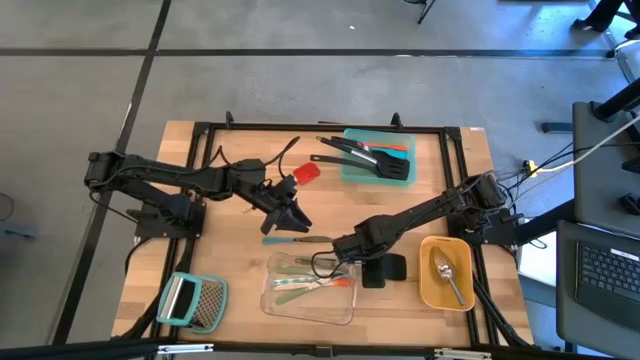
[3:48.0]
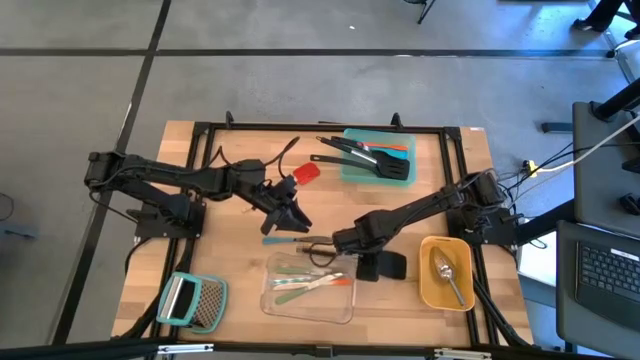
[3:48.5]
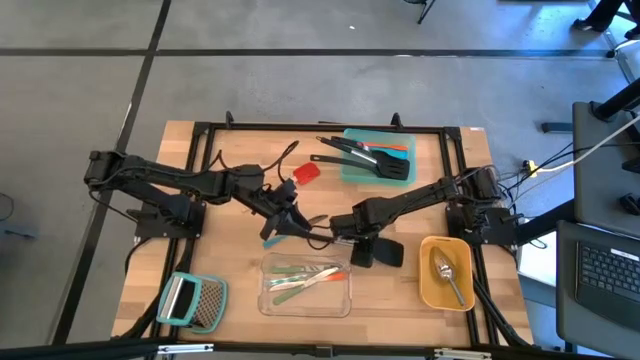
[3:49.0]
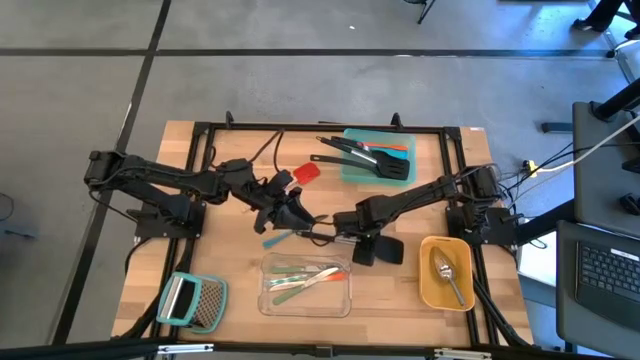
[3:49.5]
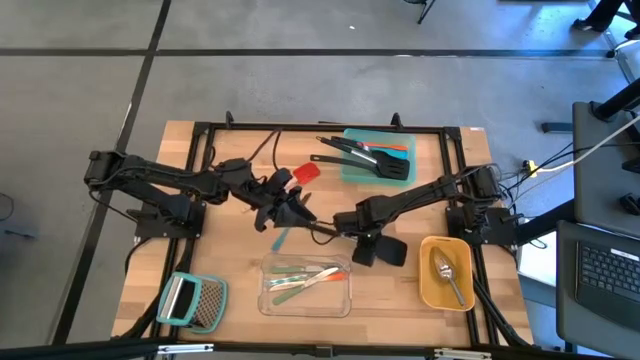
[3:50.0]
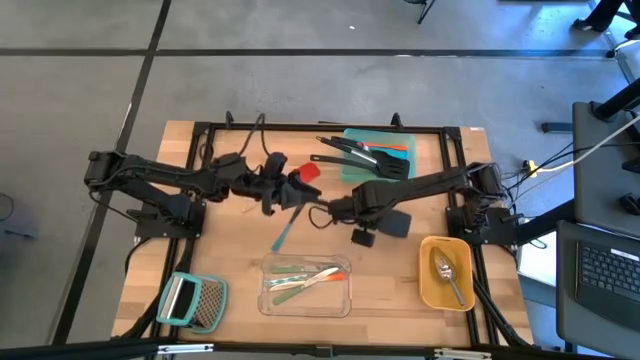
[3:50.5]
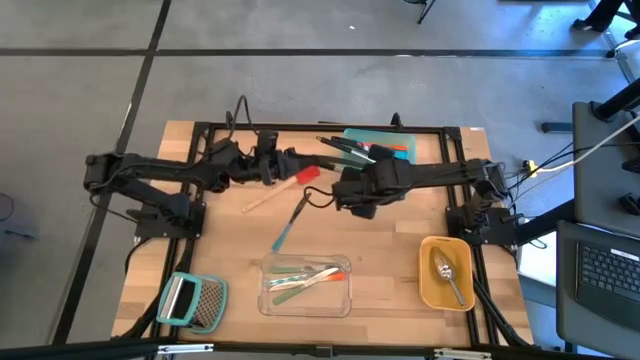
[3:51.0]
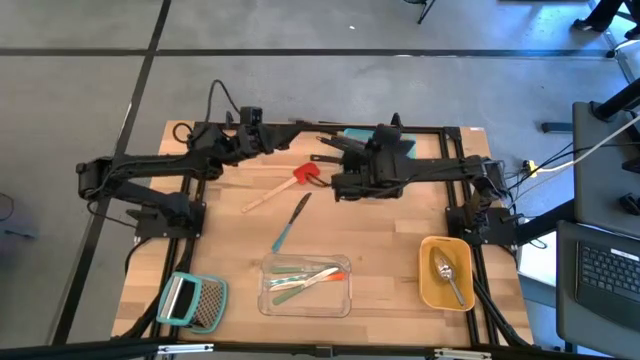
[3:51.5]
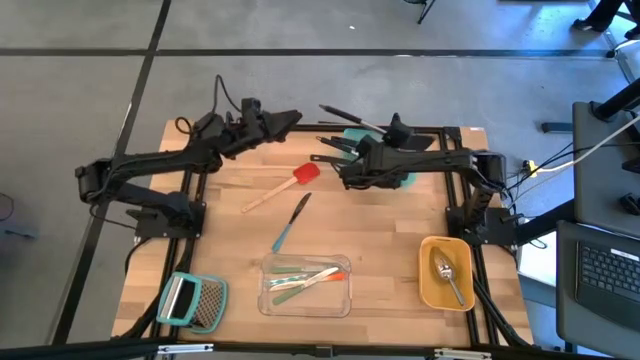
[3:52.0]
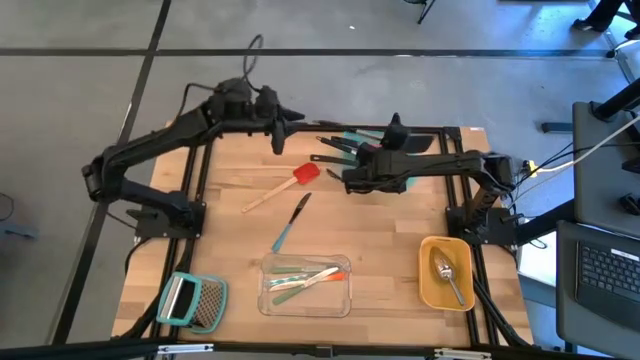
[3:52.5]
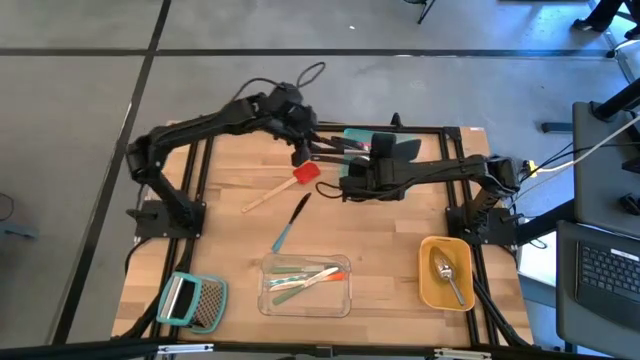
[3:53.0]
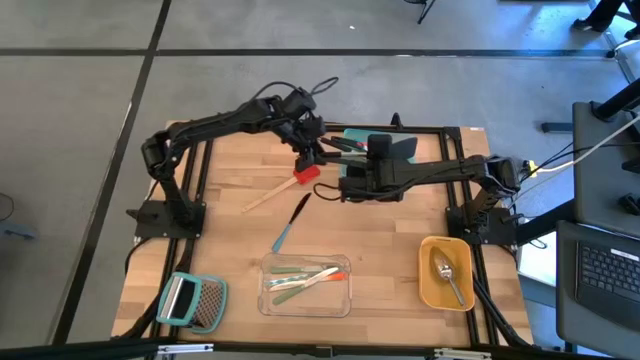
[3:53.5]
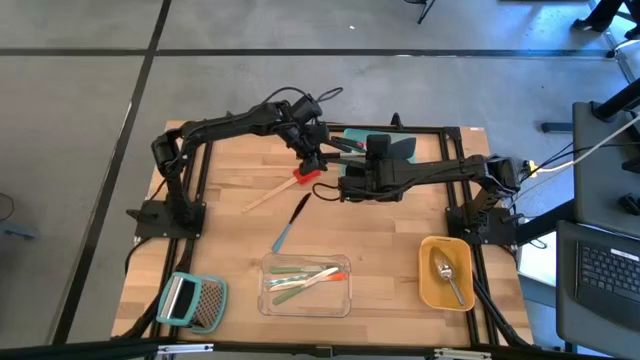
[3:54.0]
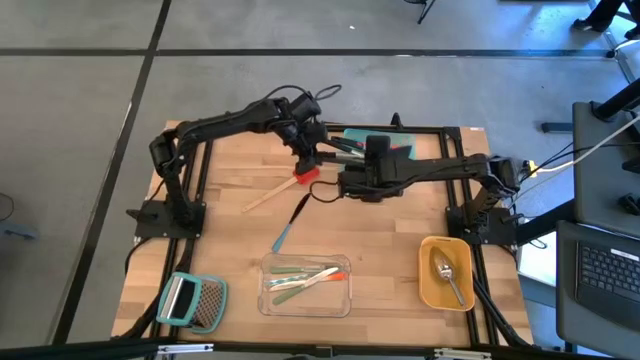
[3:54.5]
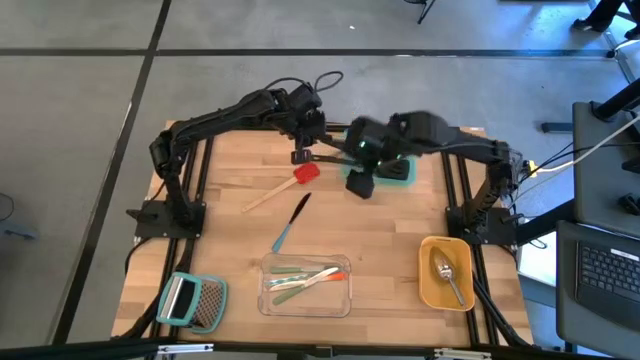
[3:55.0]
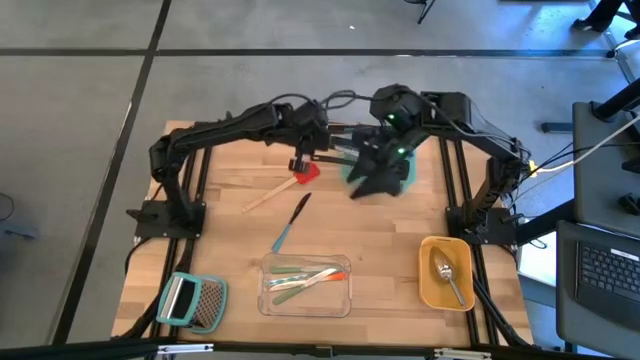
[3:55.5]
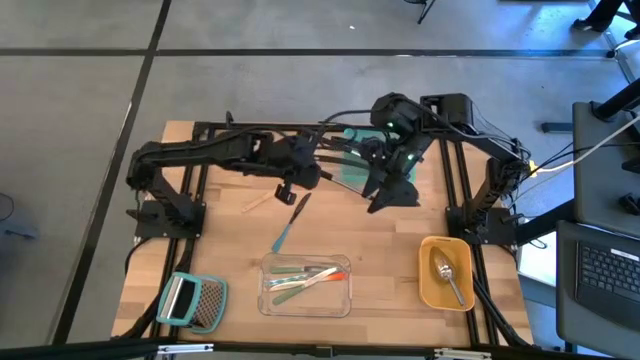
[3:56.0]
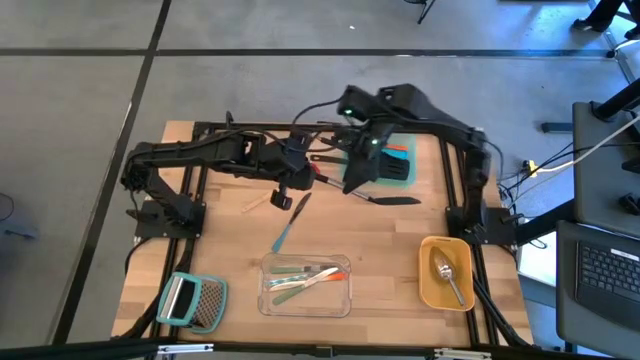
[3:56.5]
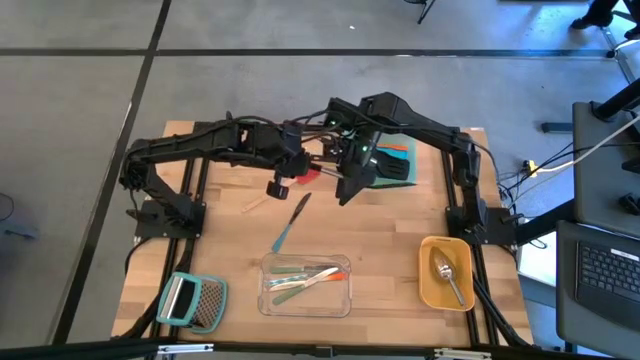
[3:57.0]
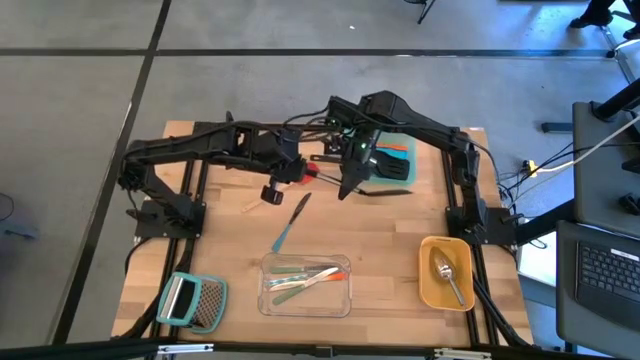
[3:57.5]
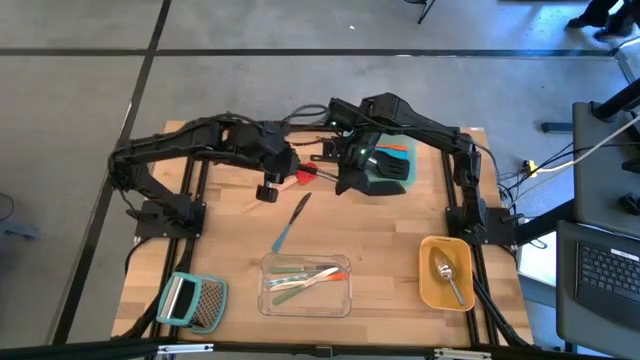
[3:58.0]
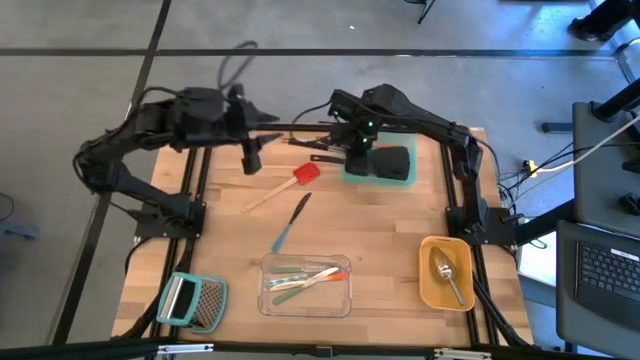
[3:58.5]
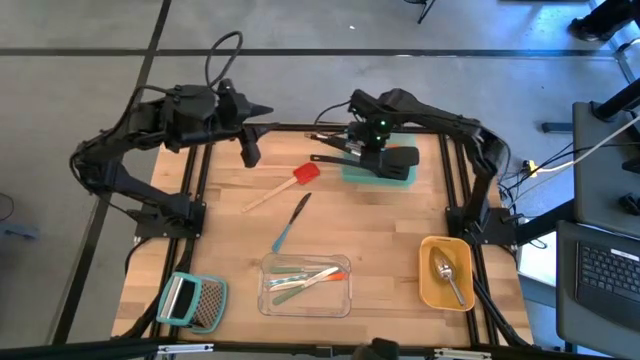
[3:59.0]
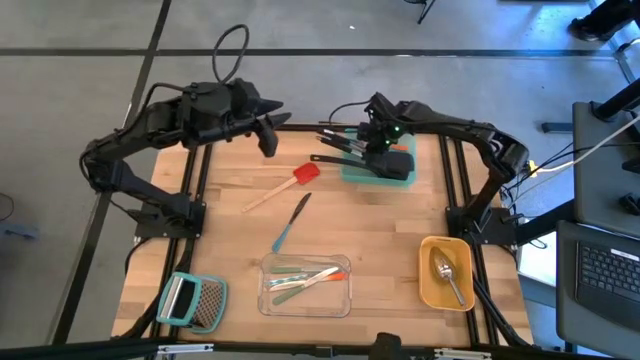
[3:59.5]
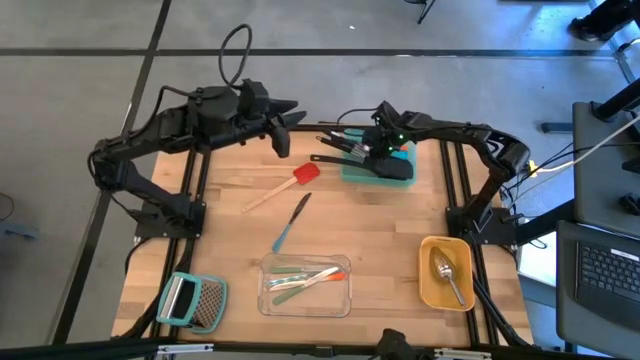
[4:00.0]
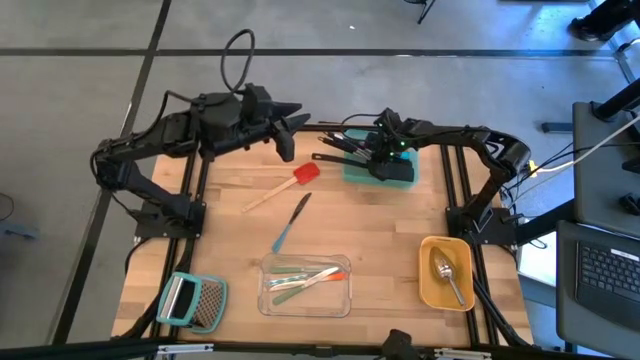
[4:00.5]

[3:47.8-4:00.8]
Task: Pick & Place Kitchen Items
Put the black spatula into the green bin

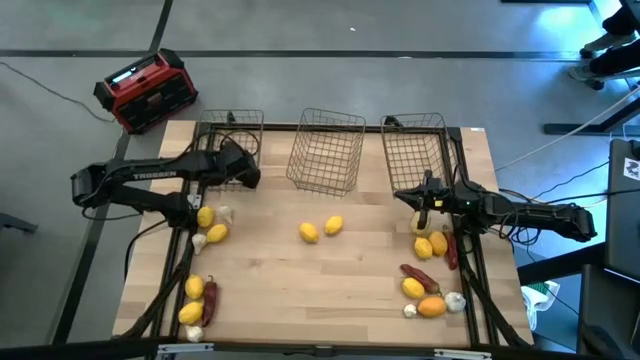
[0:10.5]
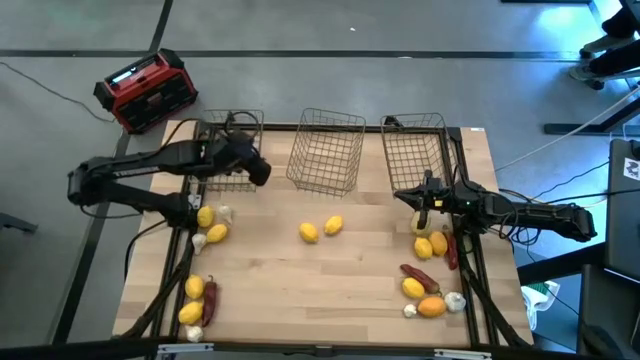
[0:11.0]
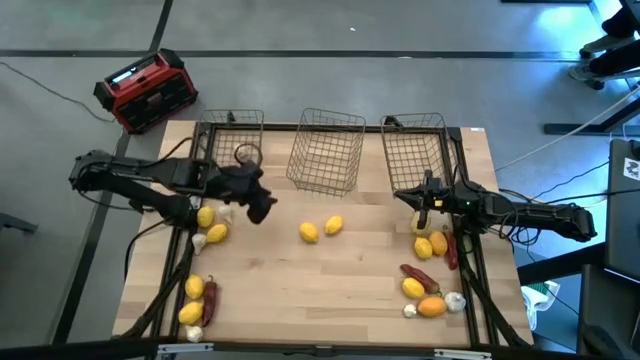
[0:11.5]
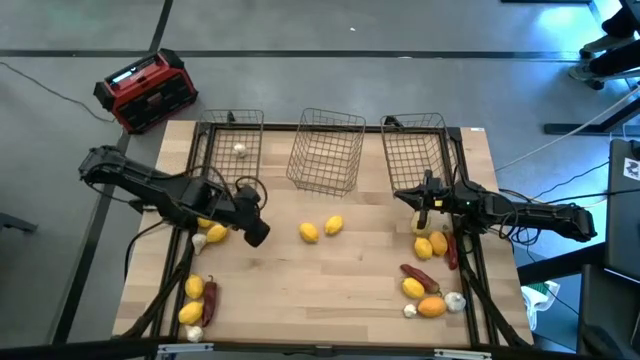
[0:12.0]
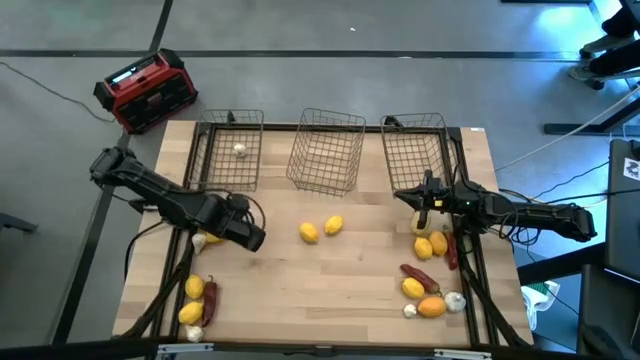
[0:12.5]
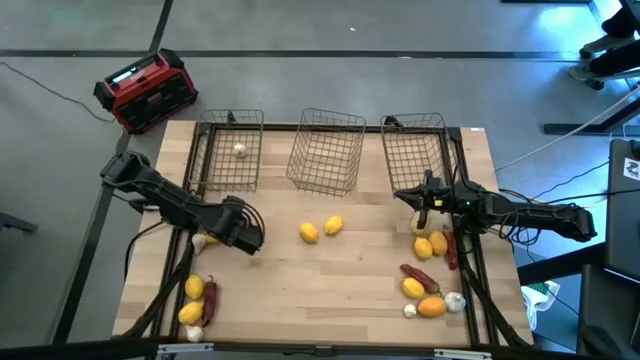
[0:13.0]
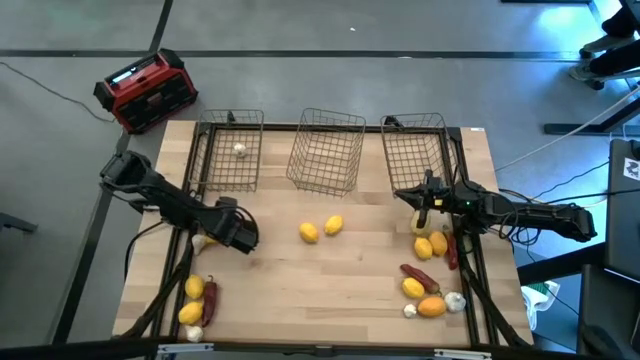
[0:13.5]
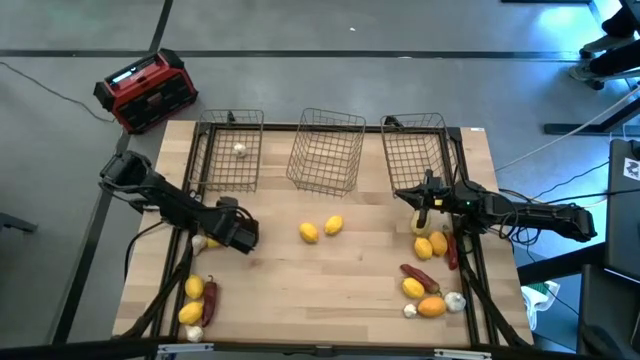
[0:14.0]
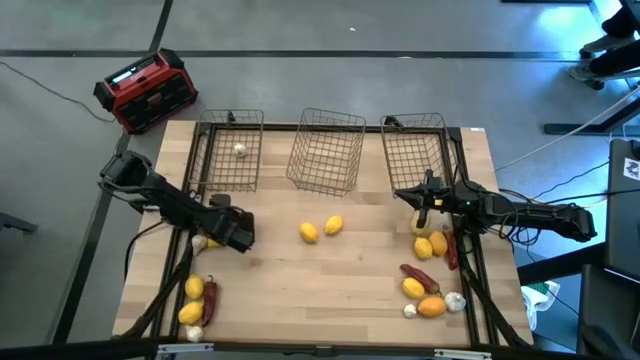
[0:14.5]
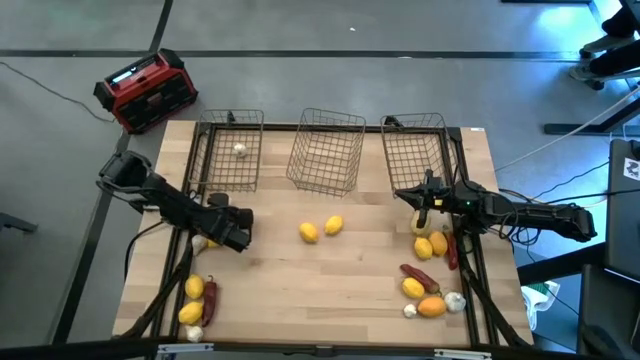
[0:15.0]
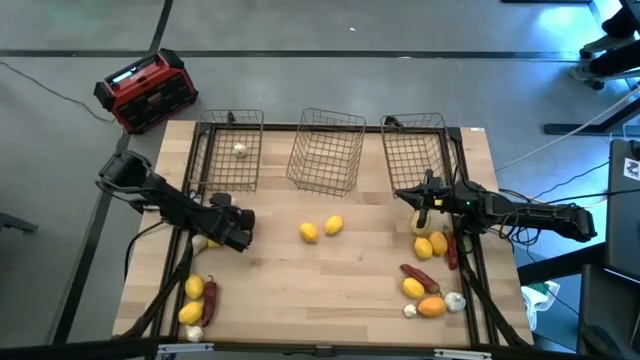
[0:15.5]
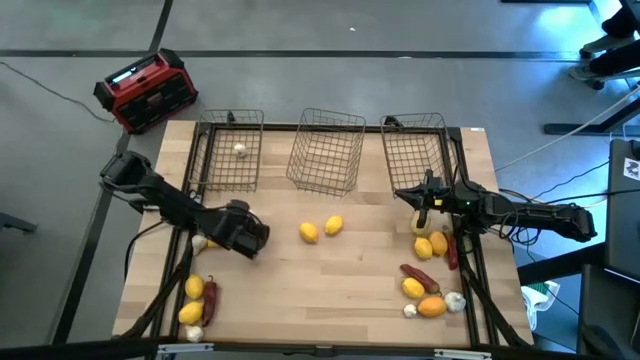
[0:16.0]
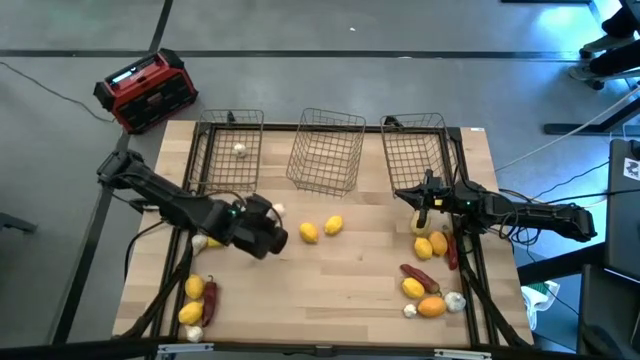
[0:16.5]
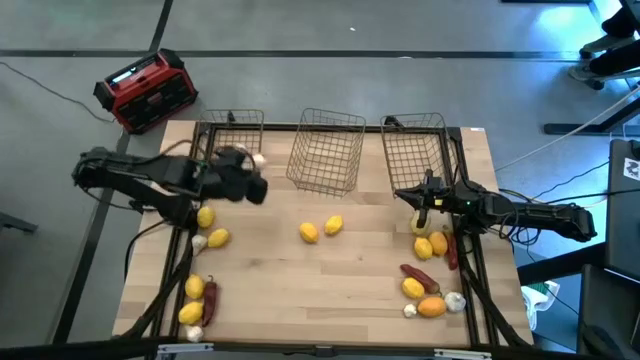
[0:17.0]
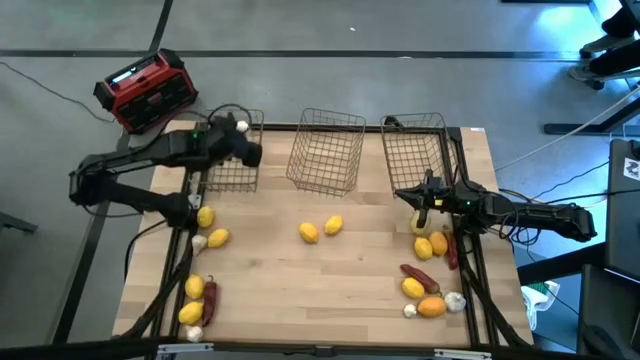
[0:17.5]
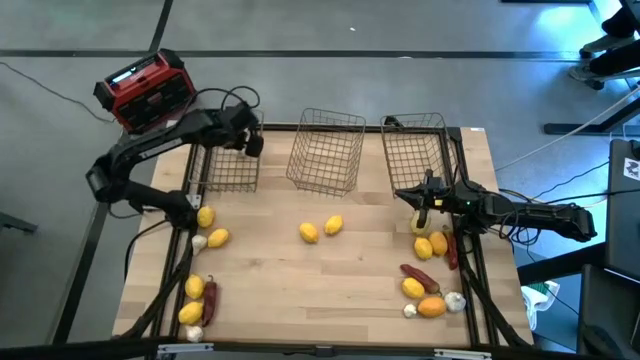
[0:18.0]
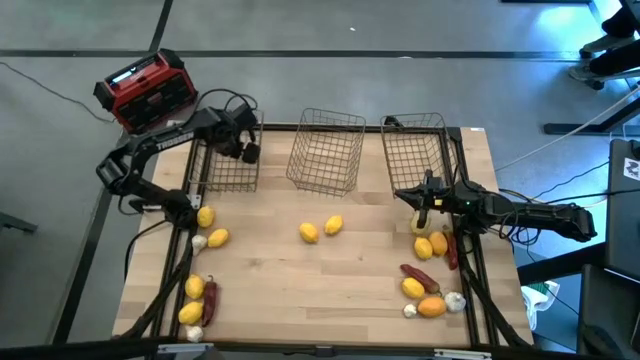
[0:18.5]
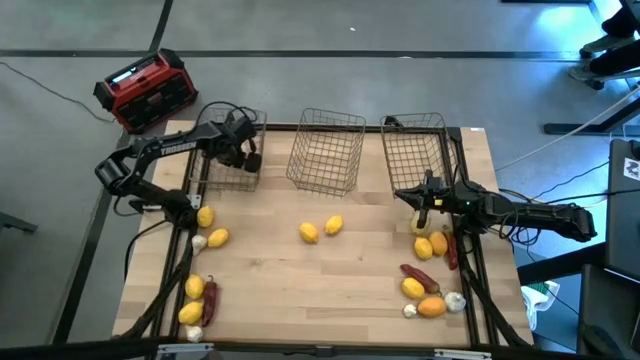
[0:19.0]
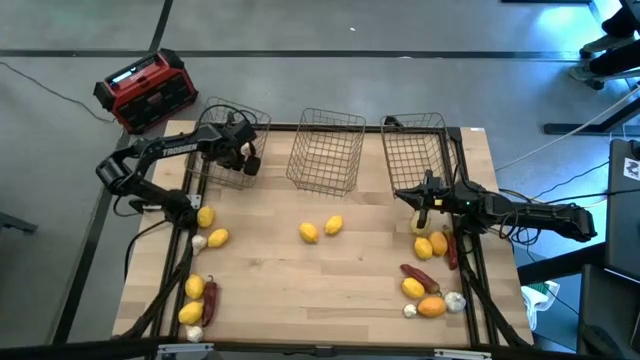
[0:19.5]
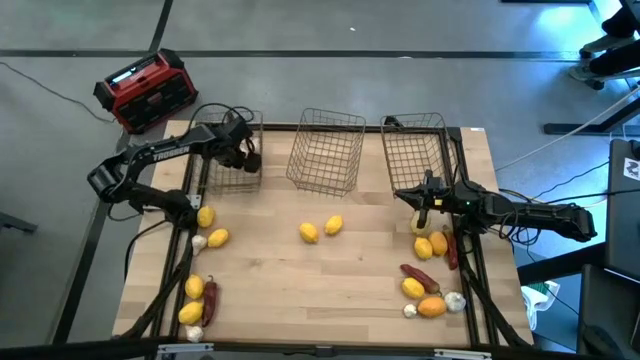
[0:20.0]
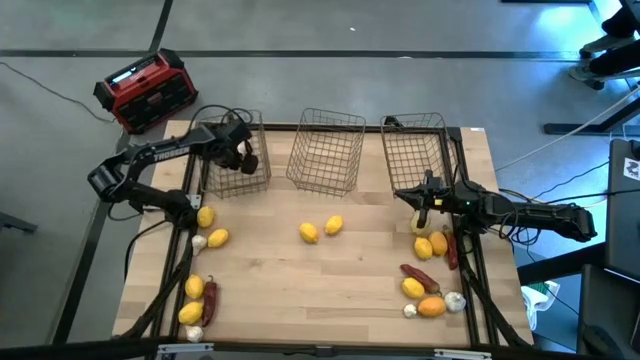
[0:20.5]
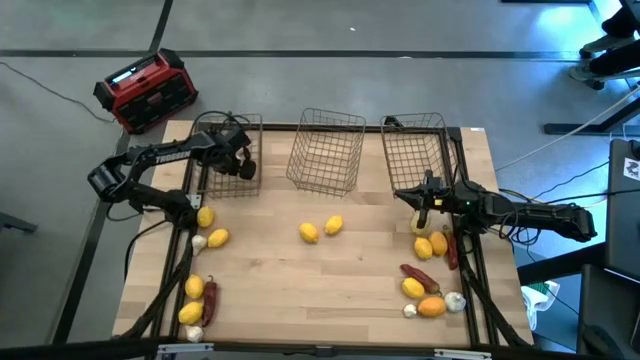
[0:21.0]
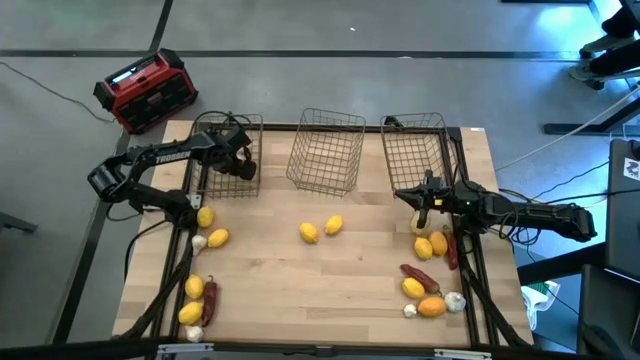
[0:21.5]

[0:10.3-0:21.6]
Task: Sort produce into baskets
Put the garlic into the left wire basket
